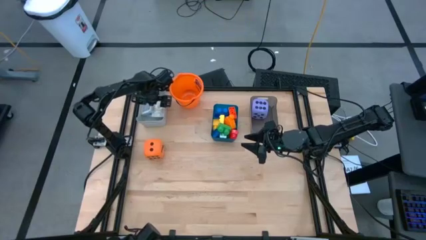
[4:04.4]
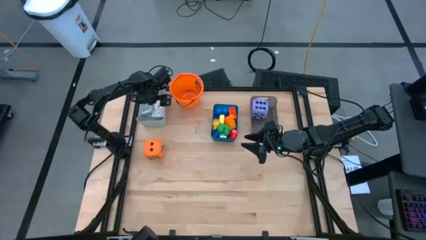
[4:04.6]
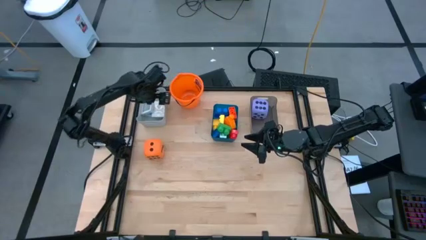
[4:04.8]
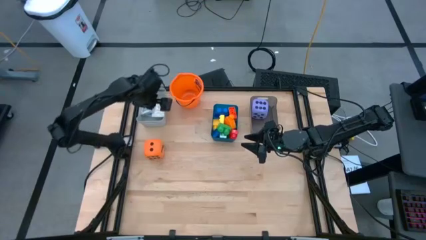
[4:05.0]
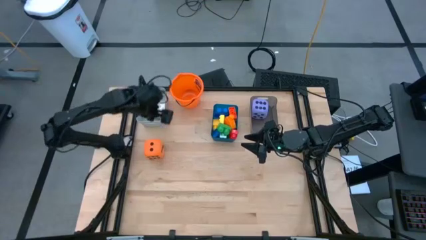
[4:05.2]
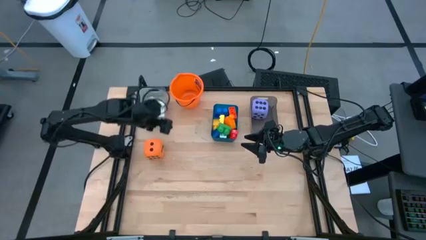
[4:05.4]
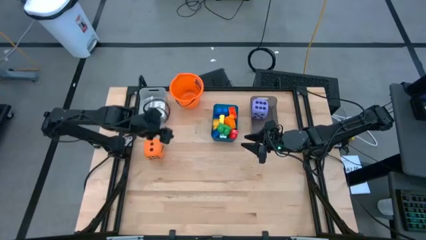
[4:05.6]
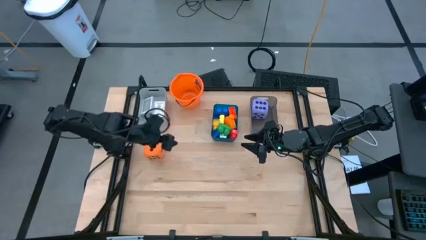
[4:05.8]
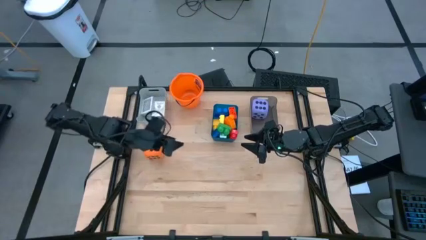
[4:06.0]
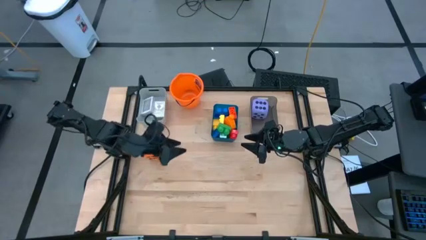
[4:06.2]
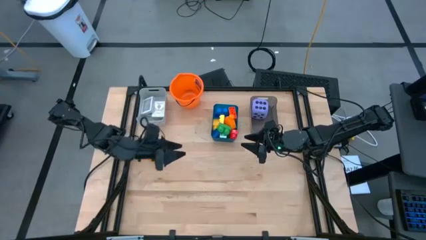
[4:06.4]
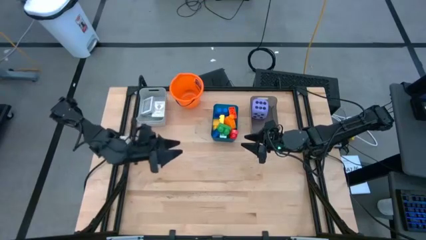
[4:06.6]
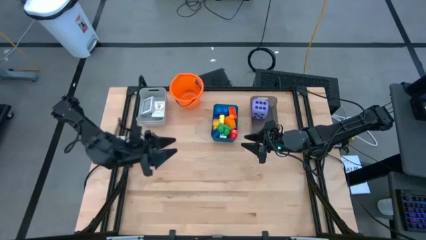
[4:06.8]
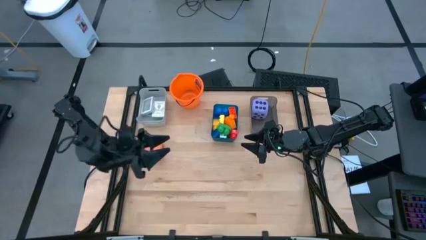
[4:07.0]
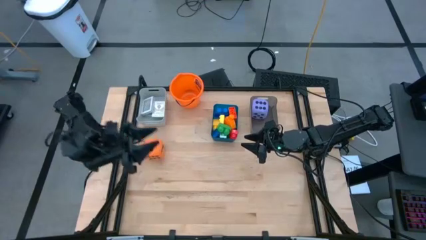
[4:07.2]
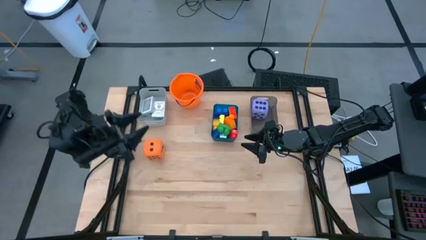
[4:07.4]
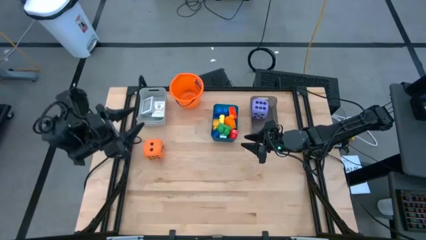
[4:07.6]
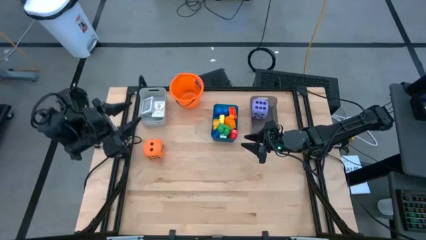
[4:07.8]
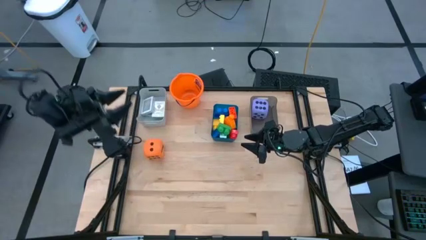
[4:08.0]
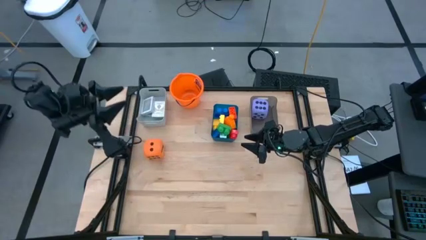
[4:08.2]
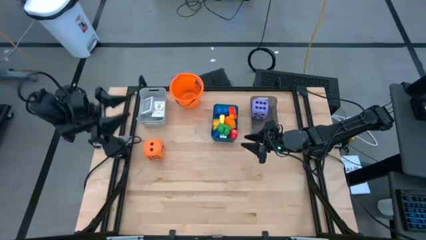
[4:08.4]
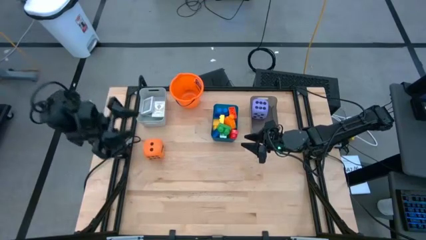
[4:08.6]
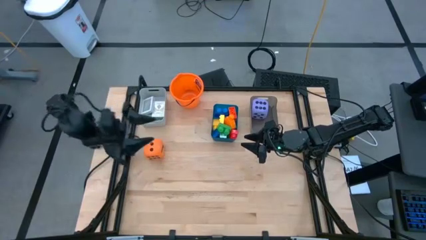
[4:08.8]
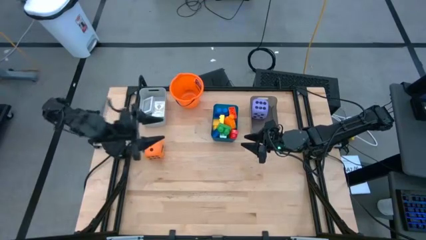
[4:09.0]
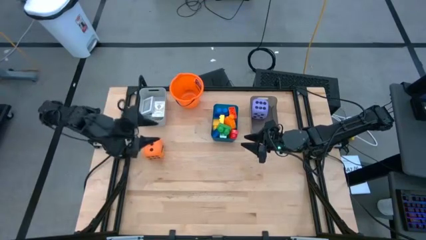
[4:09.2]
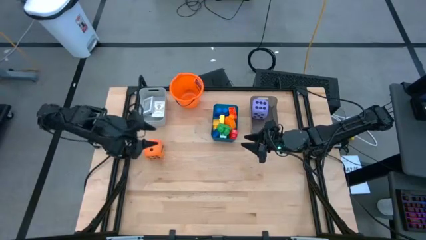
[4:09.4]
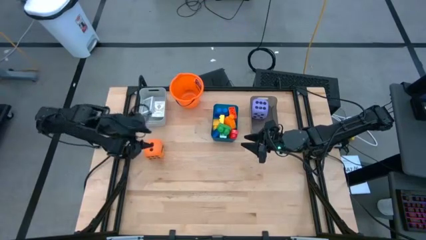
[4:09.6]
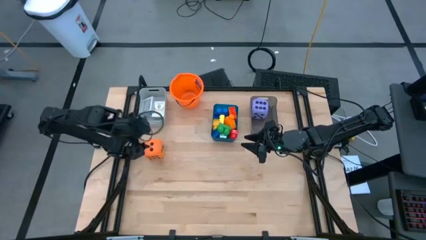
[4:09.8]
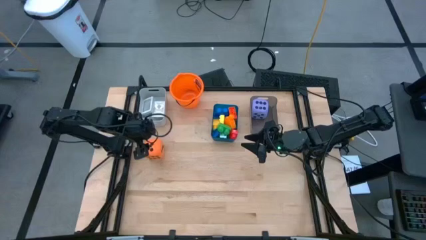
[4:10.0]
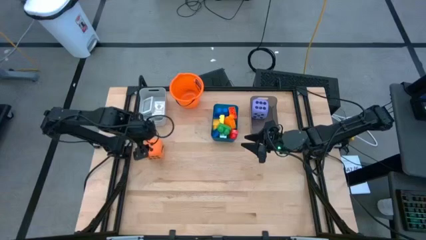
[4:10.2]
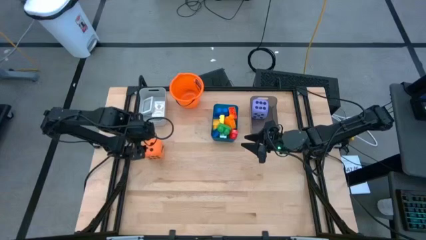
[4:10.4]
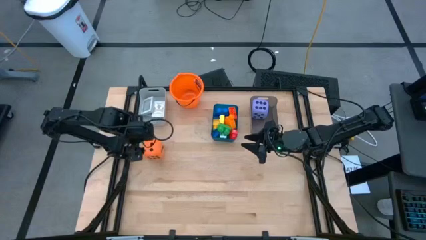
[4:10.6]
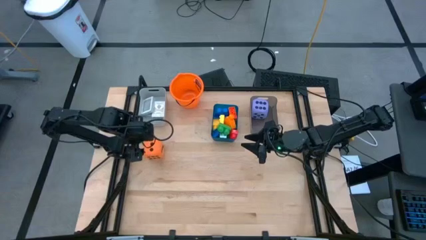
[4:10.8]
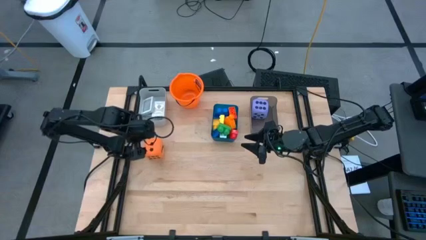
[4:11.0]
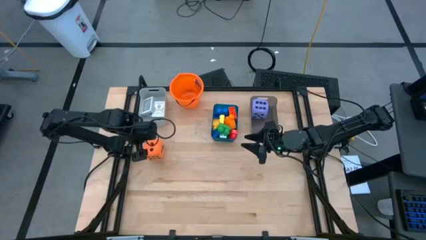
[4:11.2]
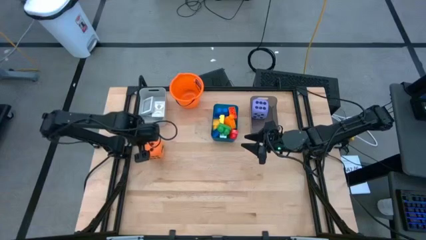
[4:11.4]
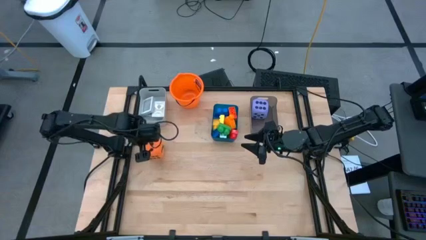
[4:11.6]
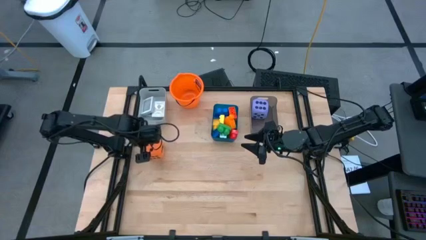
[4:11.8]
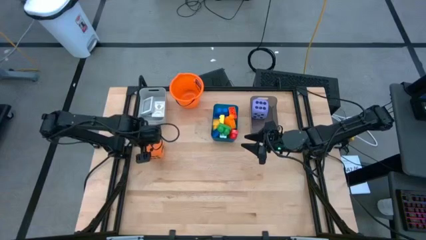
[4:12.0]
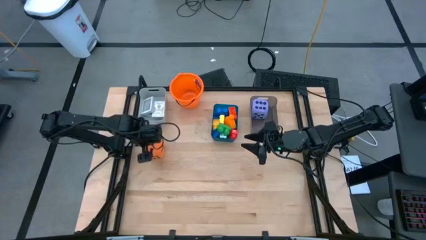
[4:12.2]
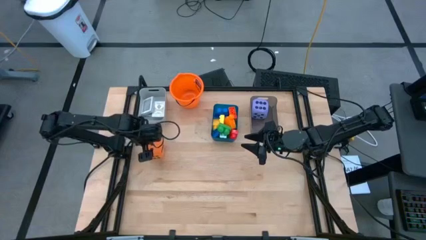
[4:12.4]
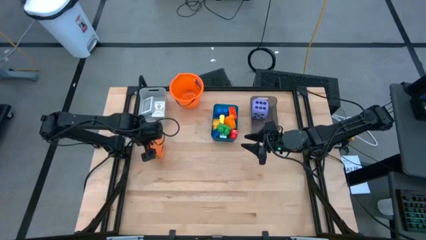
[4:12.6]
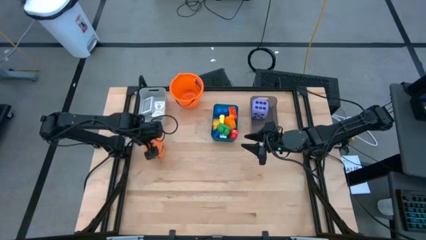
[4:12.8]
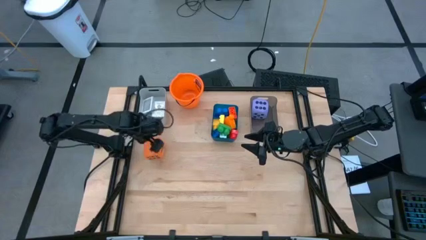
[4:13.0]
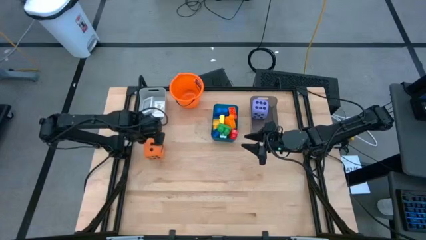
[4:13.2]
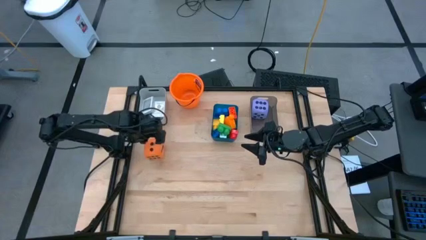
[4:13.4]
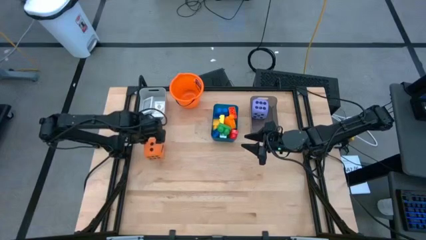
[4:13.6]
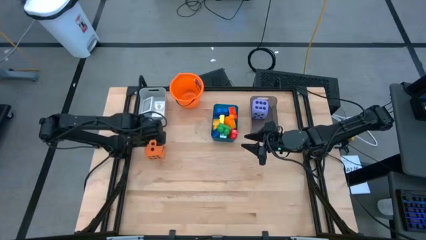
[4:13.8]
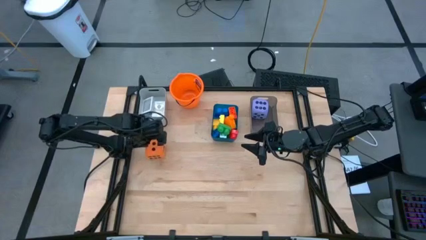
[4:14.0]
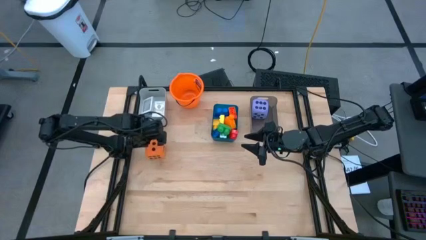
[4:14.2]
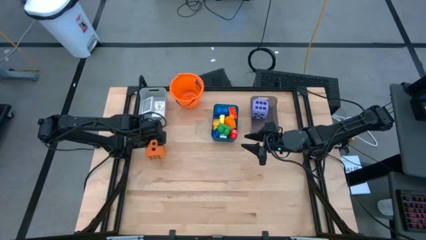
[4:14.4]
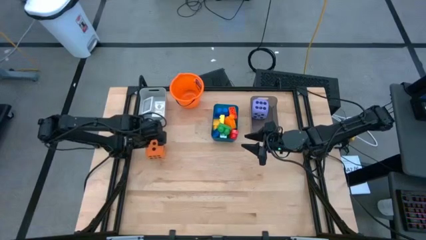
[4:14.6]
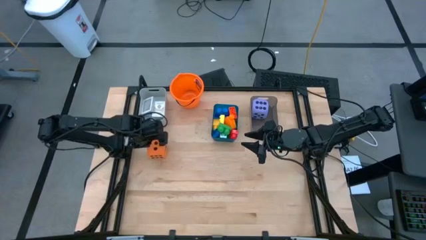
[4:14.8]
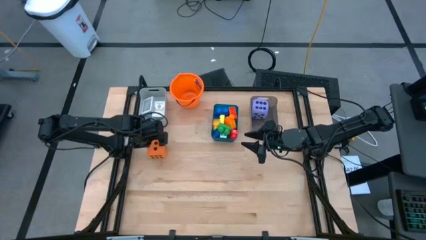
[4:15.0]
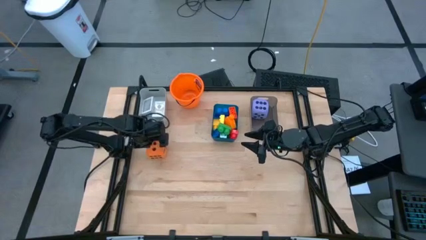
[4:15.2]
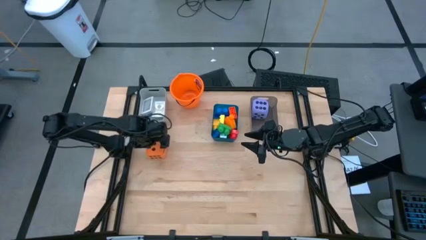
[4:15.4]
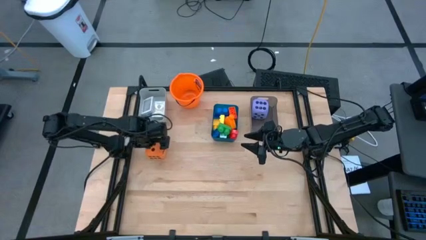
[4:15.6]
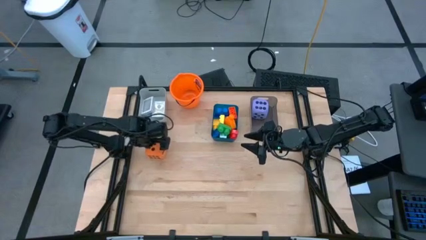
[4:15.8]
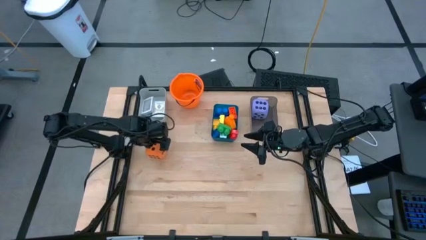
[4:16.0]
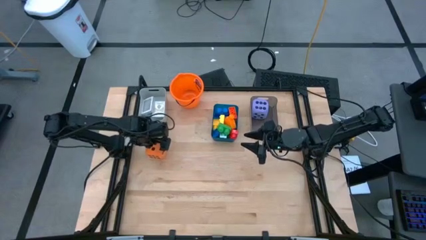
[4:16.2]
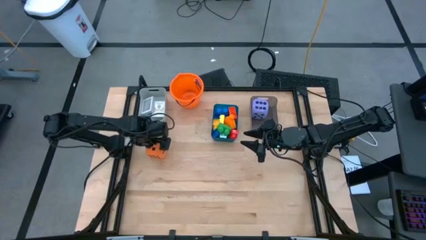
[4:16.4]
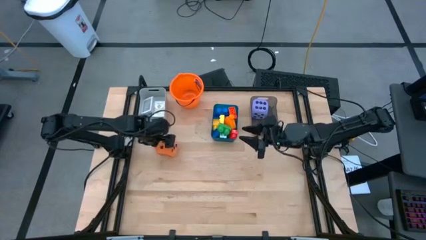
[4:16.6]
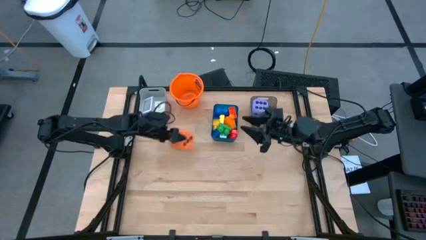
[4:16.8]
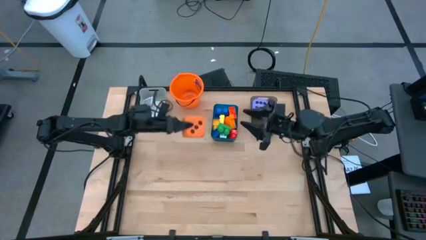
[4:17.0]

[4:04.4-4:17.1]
Task: Pick & Place Toys
Put the orange dice into the black bin

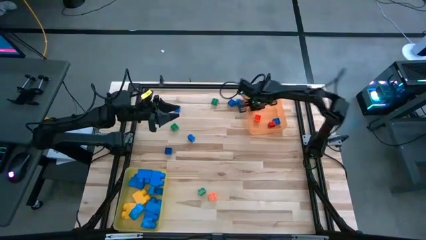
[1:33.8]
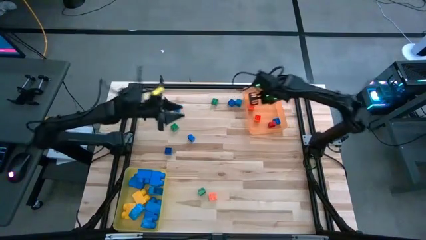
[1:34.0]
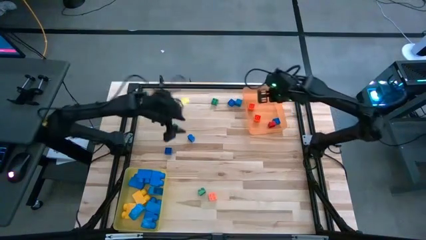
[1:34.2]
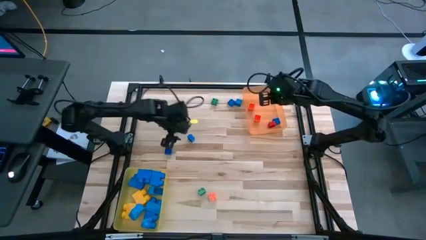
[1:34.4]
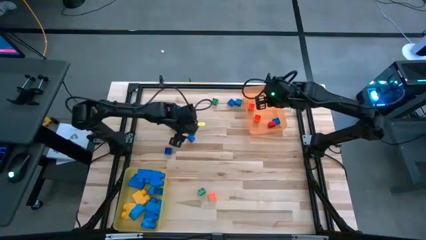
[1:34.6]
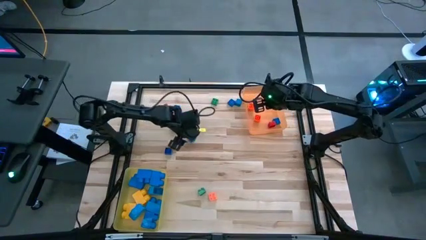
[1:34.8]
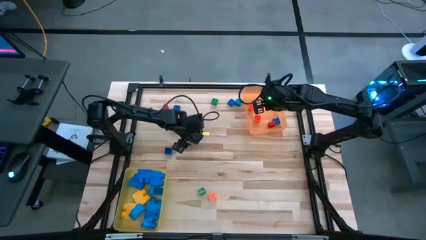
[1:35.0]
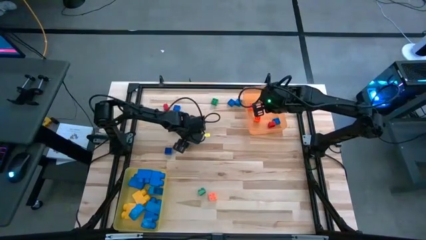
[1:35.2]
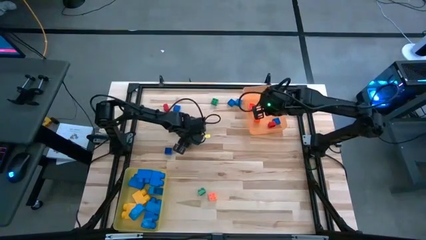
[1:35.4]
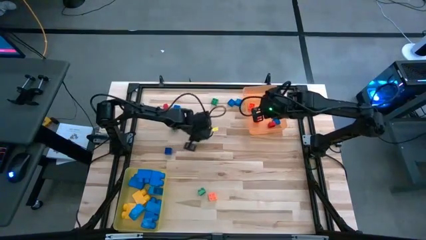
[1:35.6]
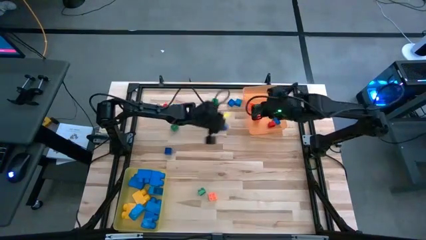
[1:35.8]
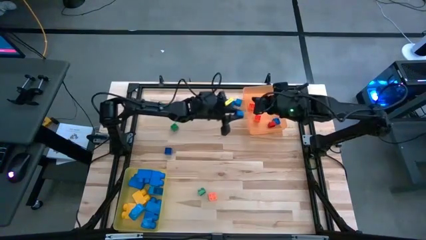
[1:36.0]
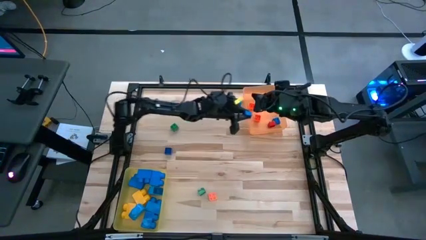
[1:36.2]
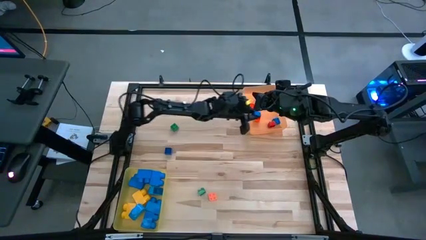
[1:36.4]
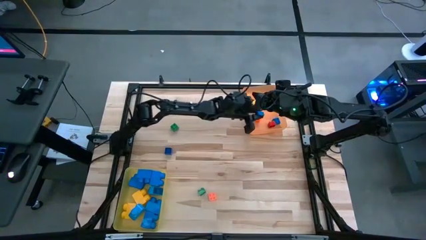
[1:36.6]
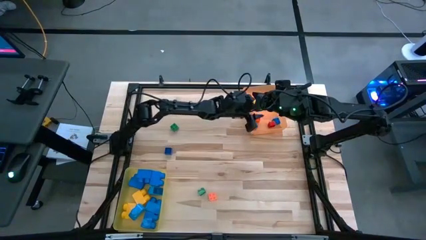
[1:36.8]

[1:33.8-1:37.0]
Task: Sort blocks by size
Put the small blue game piece into the orange bin

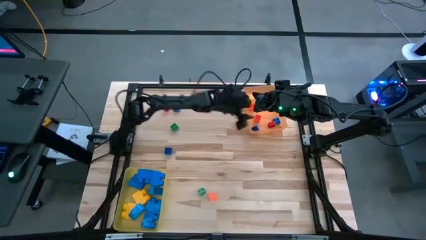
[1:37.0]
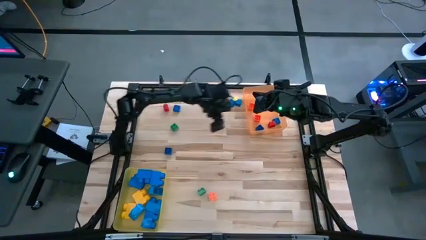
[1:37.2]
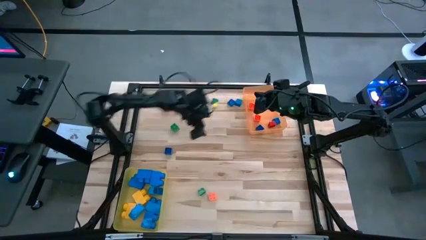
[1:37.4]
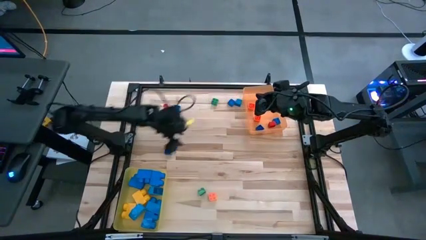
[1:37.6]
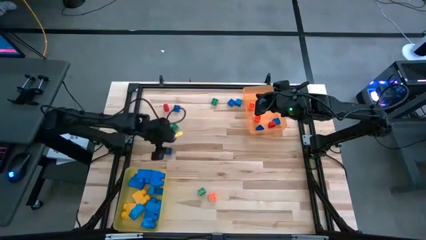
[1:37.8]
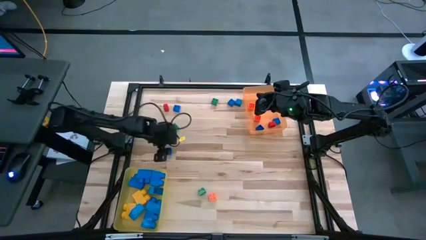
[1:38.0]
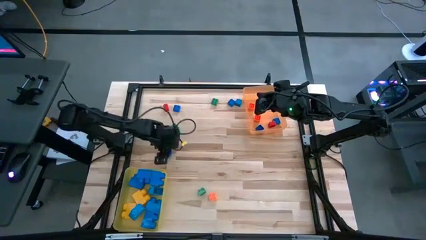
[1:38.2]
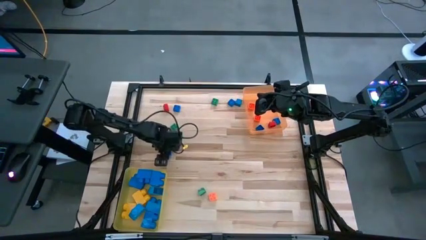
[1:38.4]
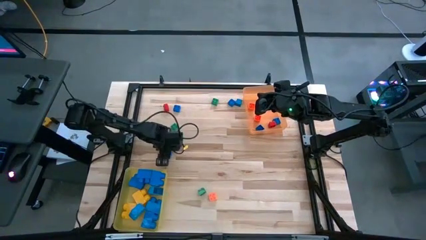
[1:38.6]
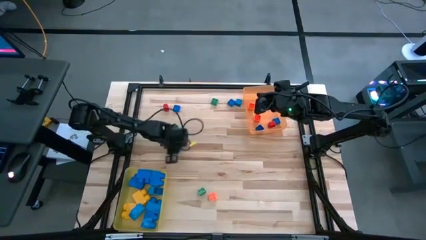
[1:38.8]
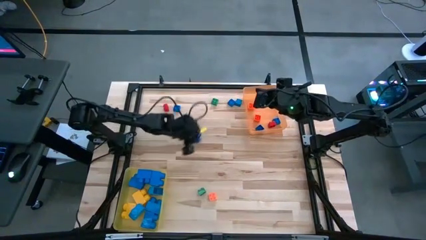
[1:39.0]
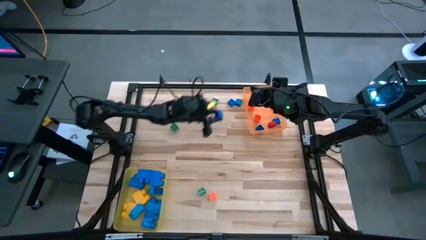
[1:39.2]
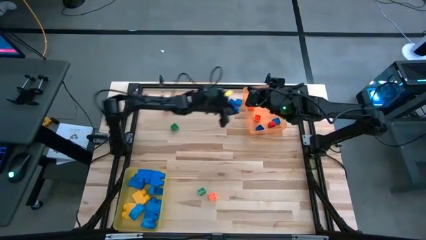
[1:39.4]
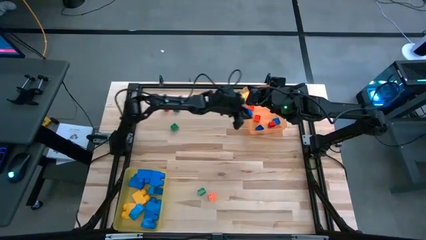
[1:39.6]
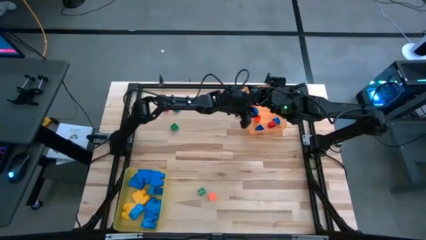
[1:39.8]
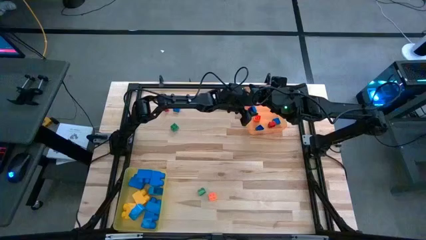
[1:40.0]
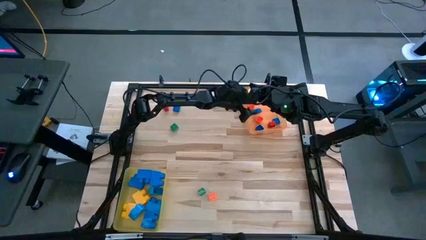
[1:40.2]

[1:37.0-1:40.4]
Put the small blue game piece into the orange bin
